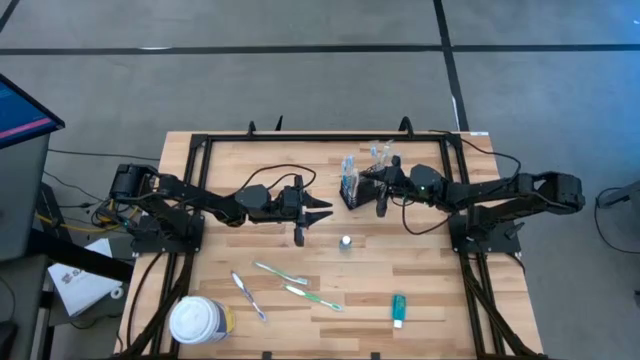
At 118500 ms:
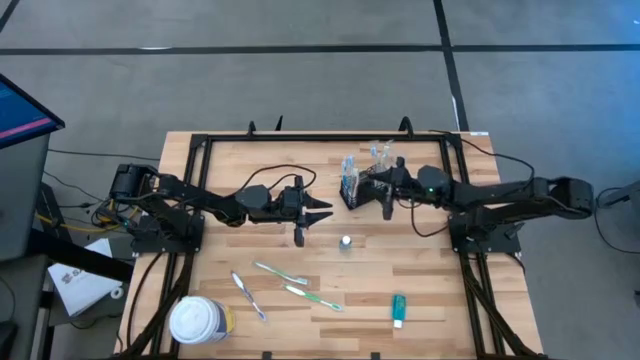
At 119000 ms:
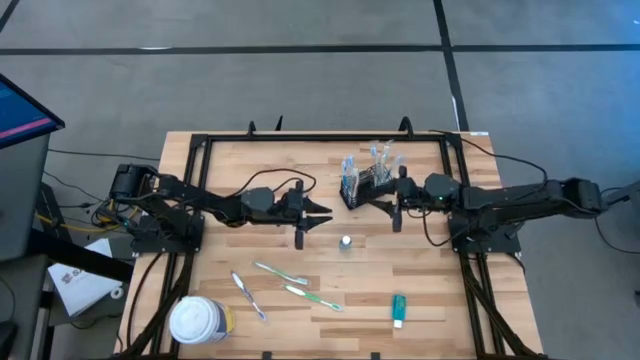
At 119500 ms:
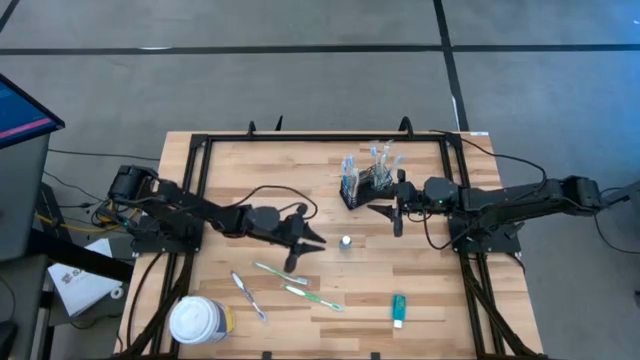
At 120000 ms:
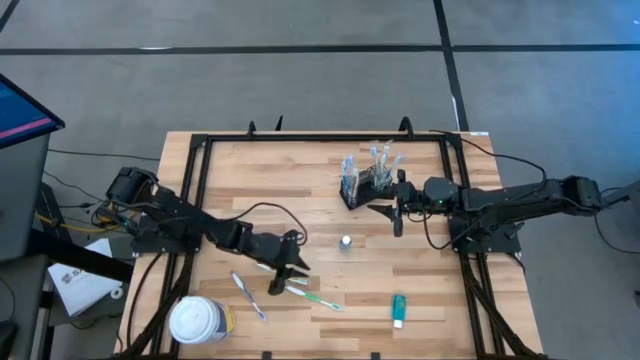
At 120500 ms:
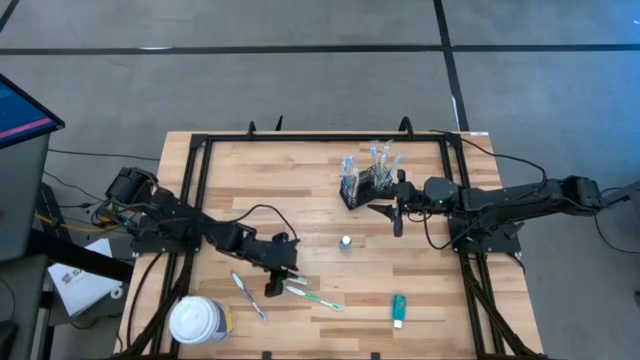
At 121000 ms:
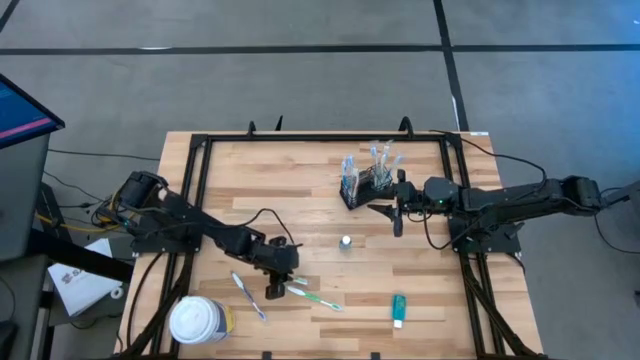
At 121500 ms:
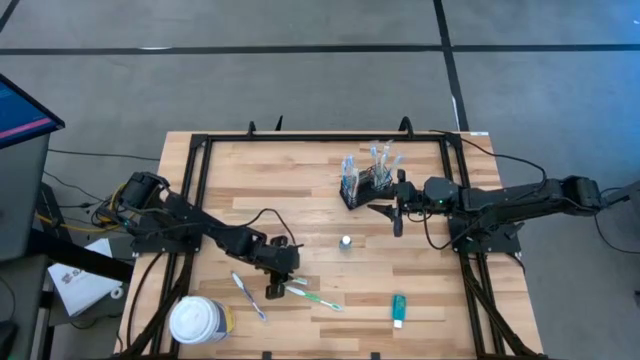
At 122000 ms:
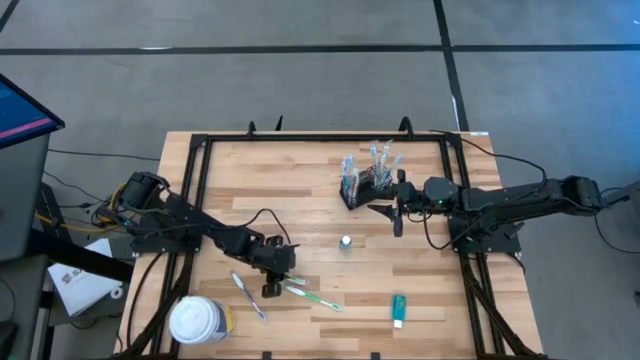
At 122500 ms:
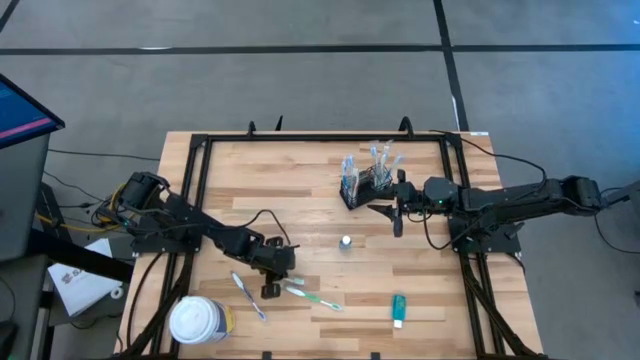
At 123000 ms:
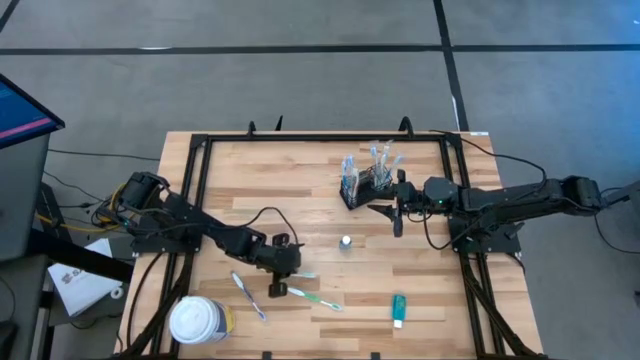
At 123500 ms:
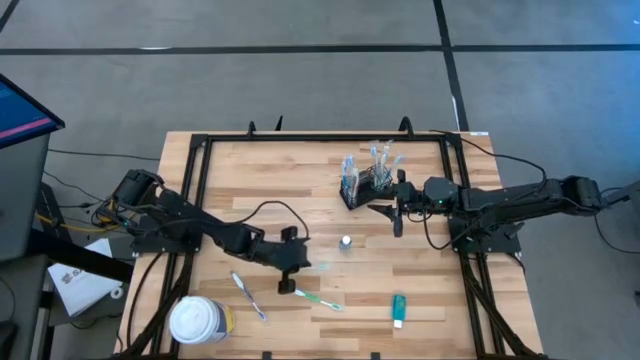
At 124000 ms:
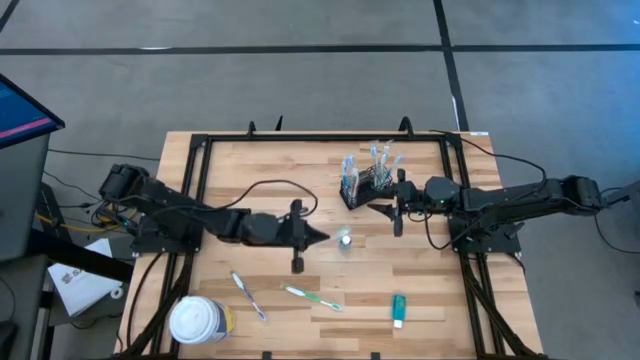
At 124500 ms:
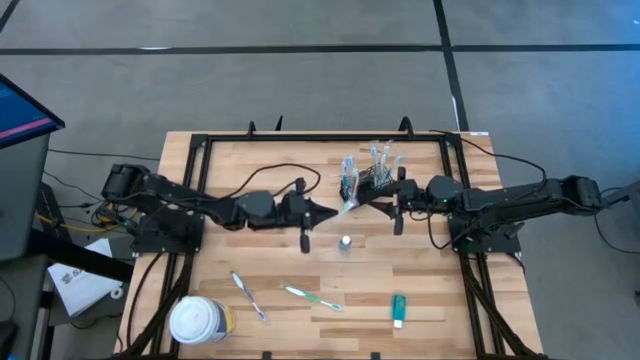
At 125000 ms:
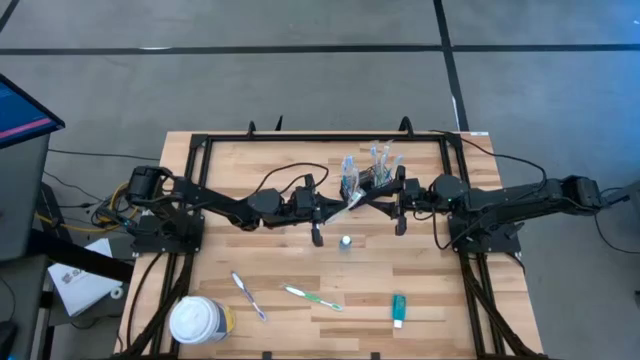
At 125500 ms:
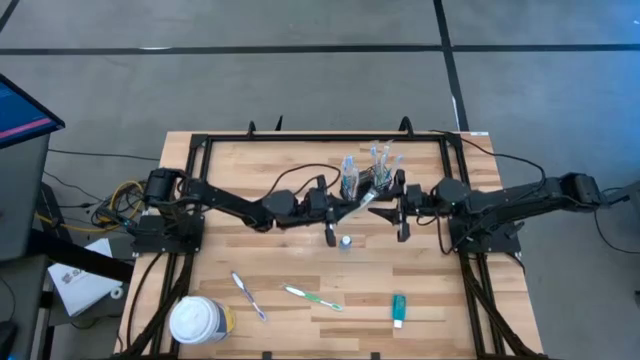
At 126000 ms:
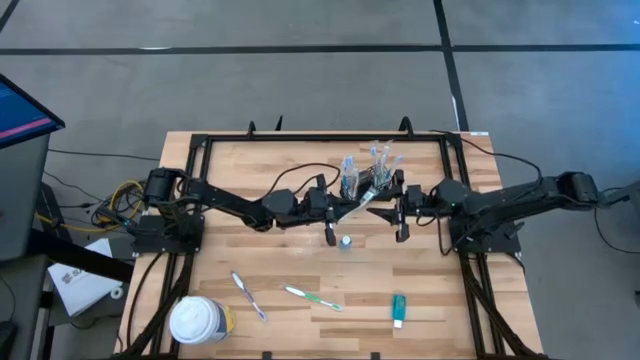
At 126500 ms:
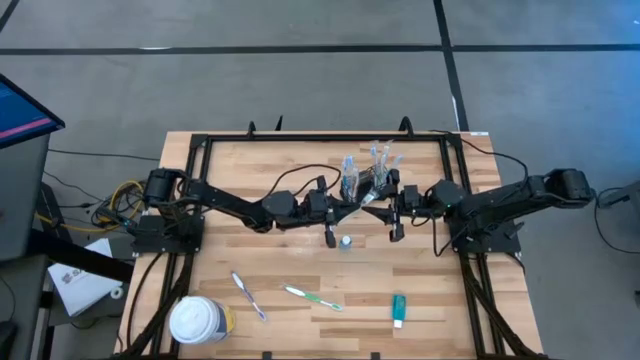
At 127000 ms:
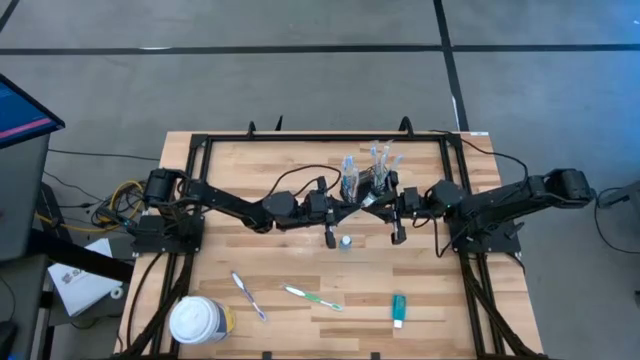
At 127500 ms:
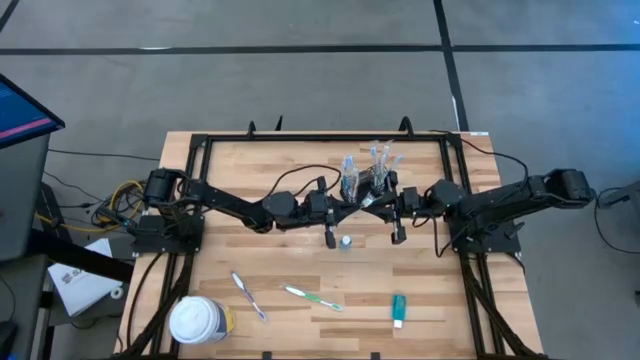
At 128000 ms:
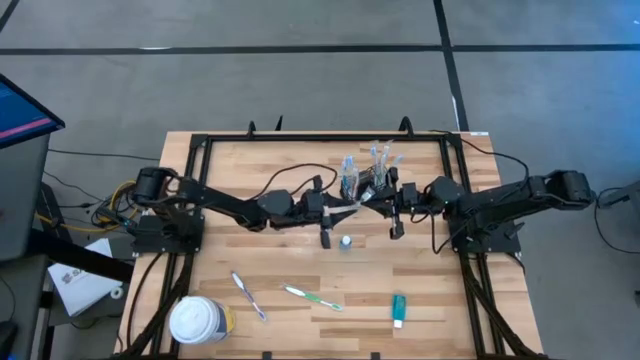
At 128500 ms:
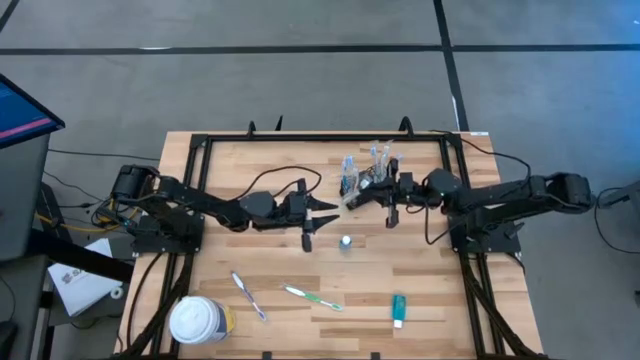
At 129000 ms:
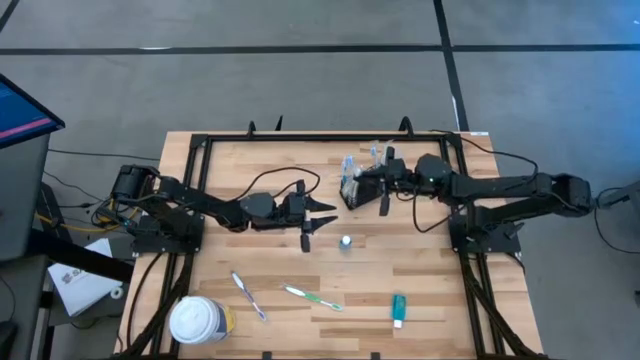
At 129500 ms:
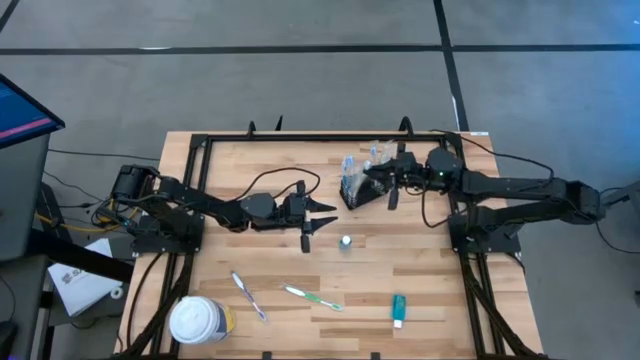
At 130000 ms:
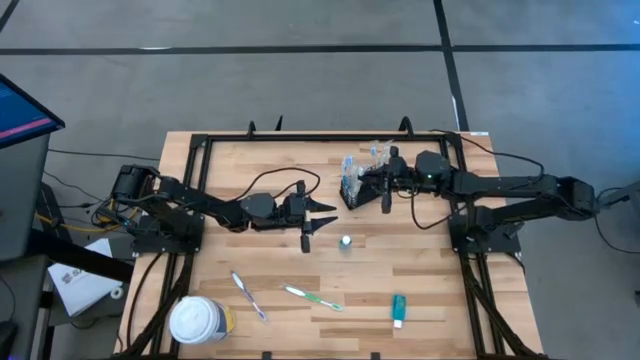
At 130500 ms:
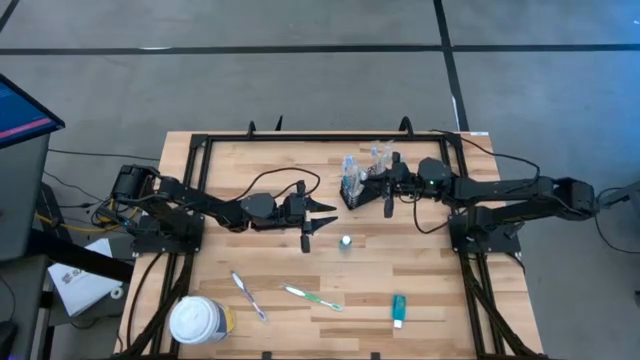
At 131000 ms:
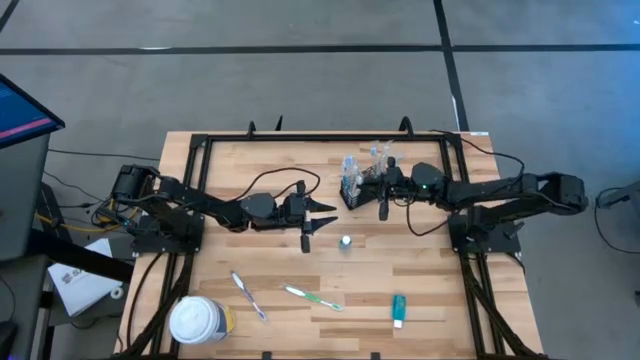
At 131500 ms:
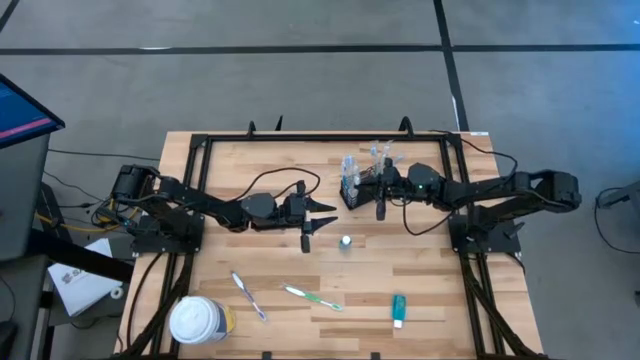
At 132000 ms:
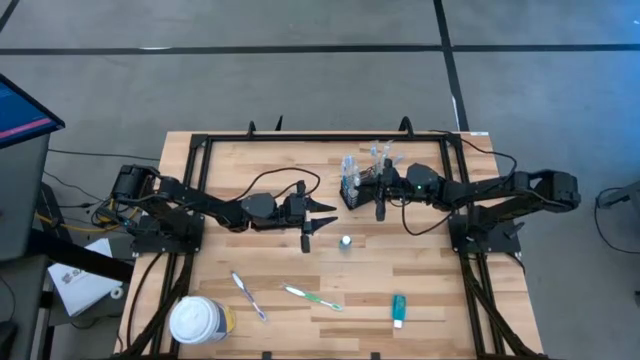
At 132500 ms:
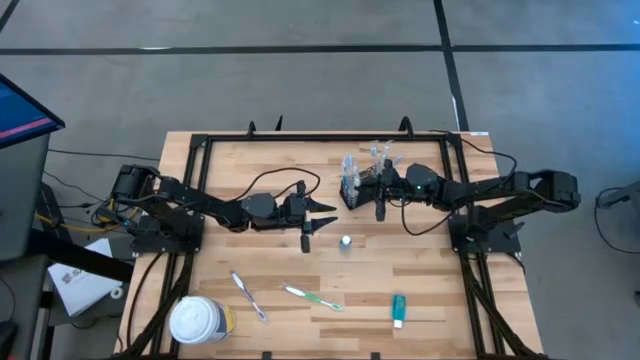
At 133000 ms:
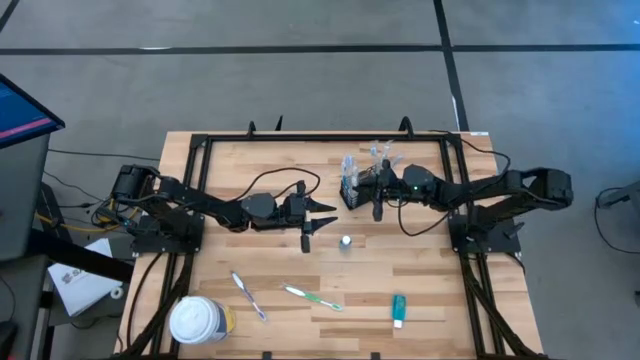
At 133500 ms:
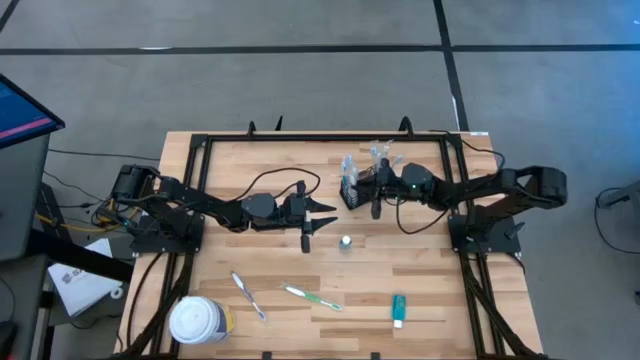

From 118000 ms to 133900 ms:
Task: Pick & Place toothbrushing station
Put the green toothbrush into the mesh organizer

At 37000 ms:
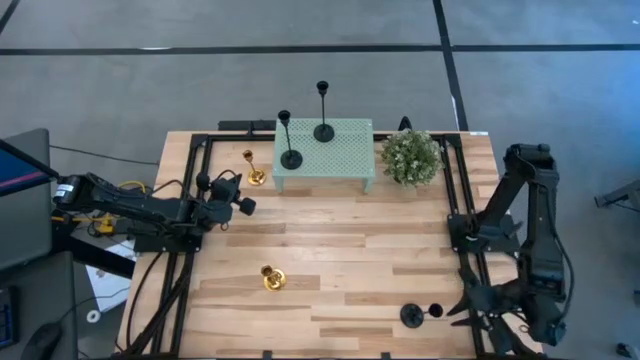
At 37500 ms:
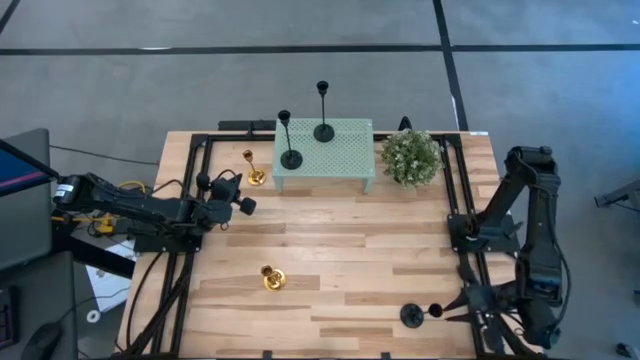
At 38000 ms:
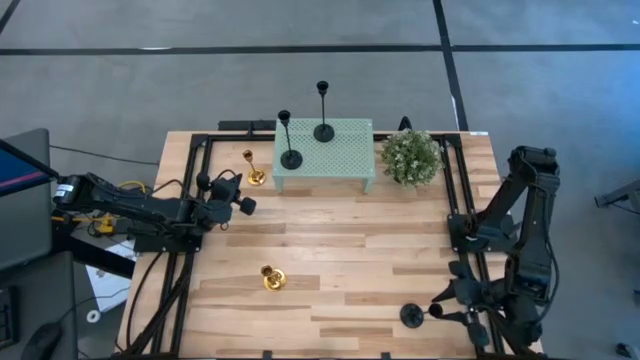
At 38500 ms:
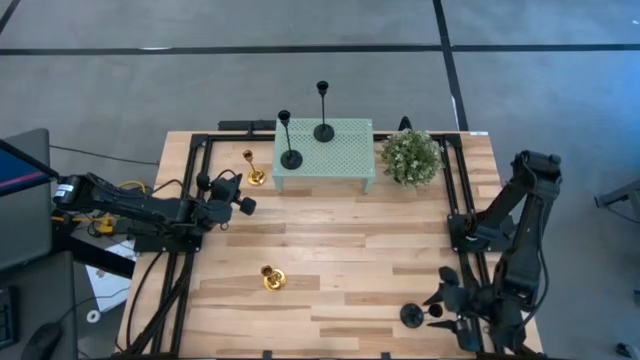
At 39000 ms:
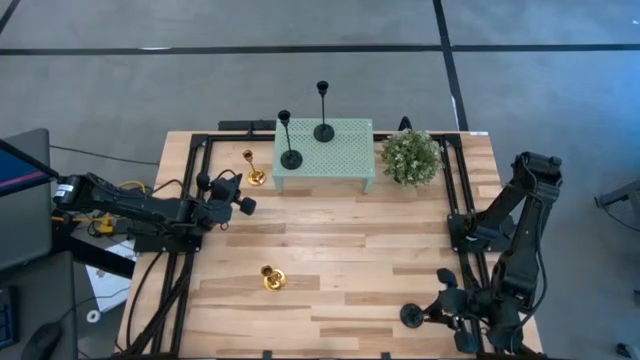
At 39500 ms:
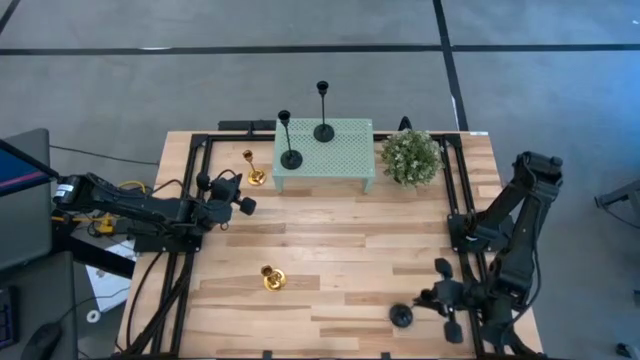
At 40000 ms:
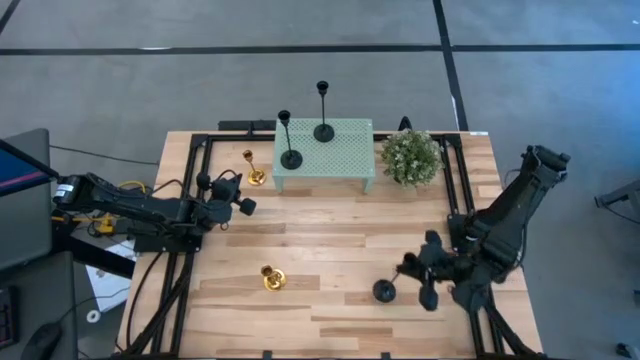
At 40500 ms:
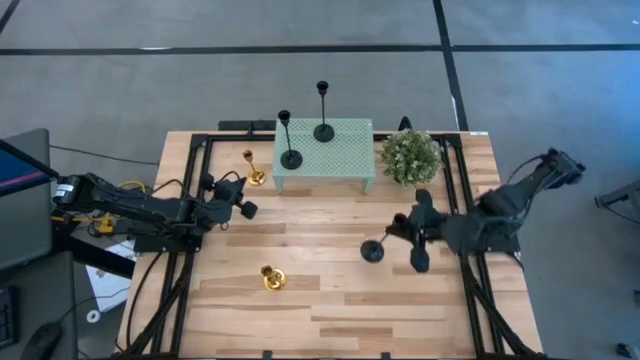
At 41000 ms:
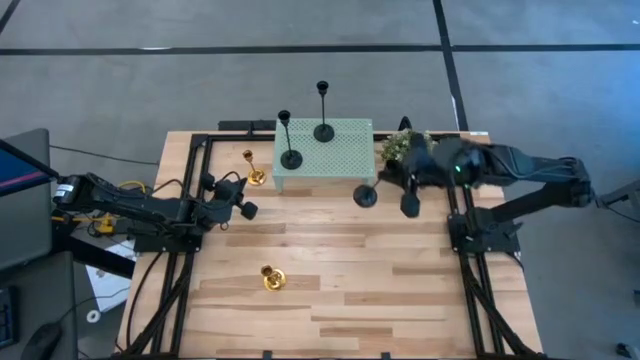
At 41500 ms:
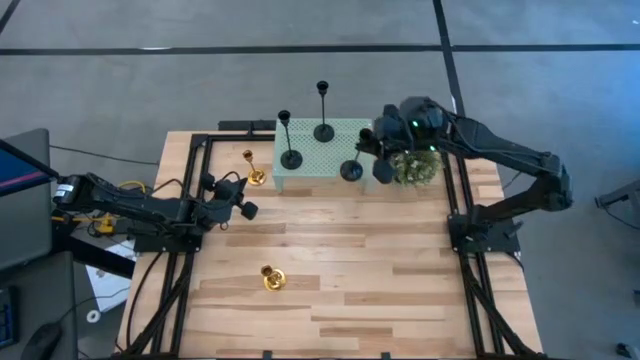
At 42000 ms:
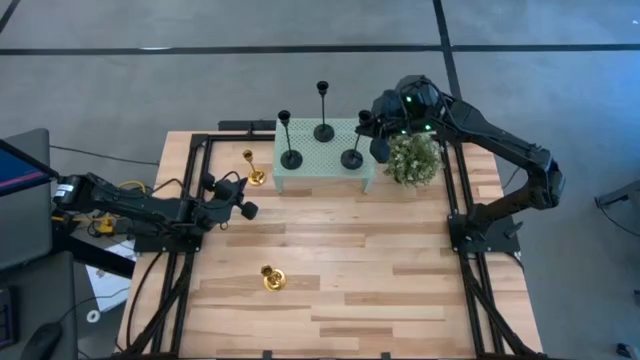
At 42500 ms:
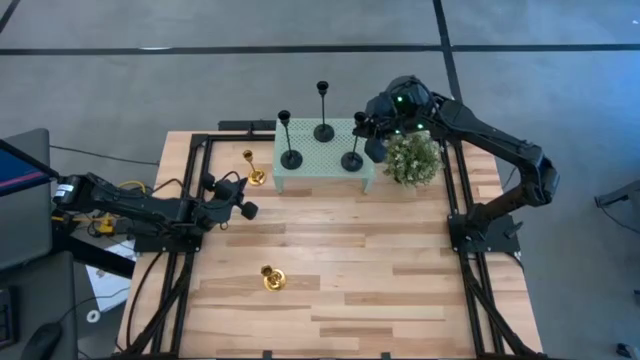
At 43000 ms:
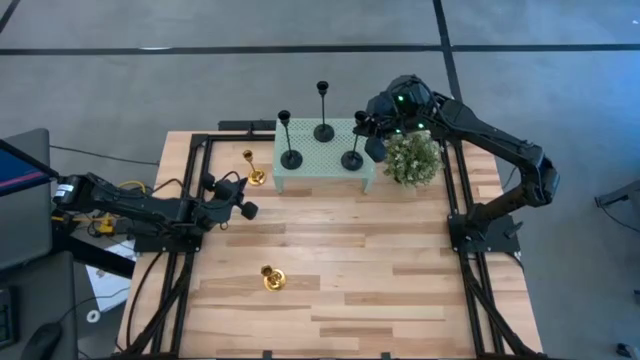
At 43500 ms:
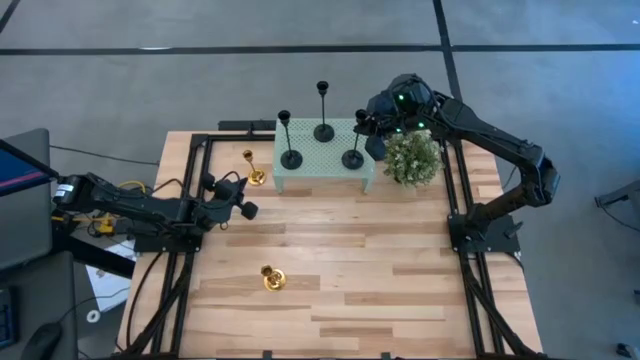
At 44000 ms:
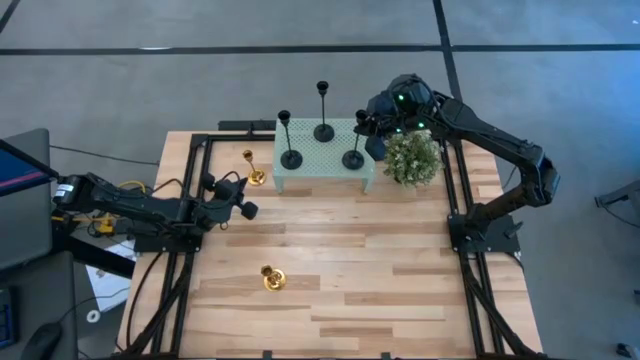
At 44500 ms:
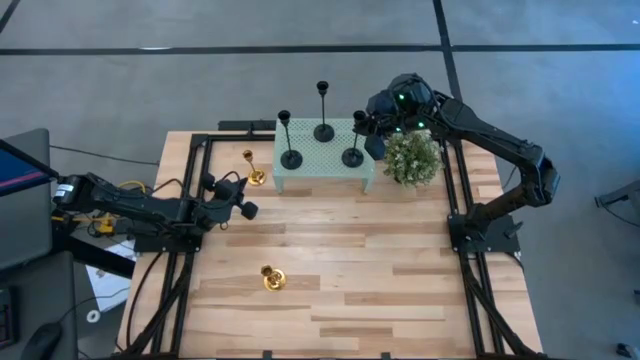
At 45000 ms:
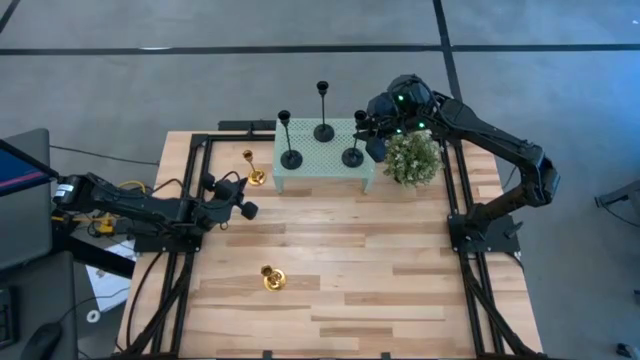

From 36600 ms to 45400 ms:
Task: Pick & Place candle stick holders
Put the black candle holder on the shelf
